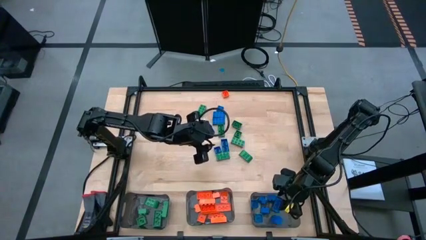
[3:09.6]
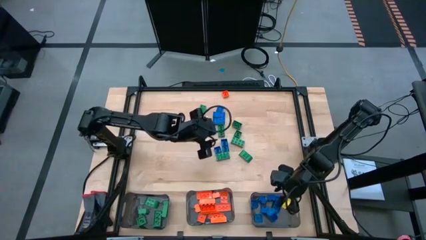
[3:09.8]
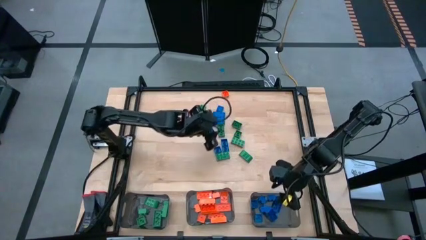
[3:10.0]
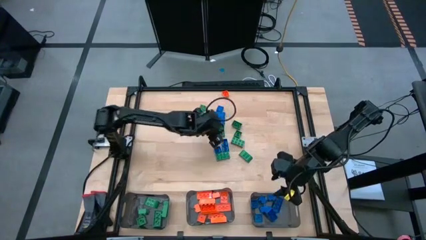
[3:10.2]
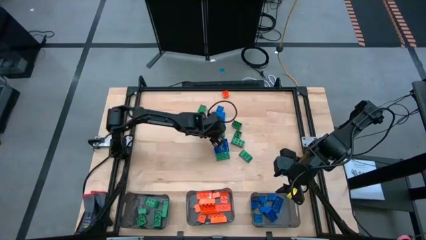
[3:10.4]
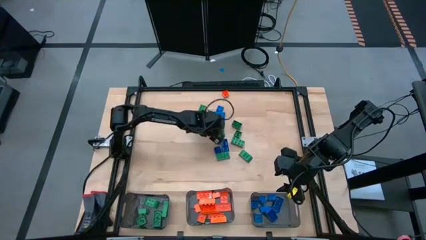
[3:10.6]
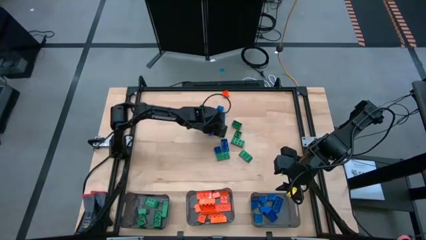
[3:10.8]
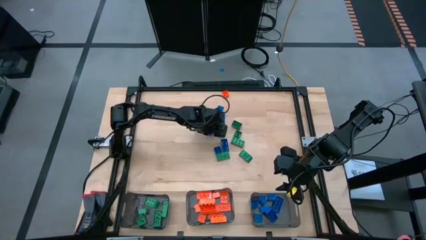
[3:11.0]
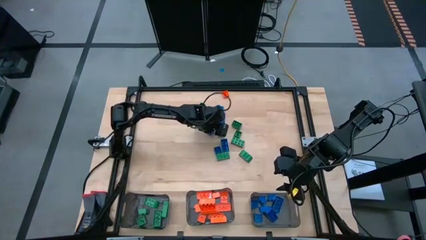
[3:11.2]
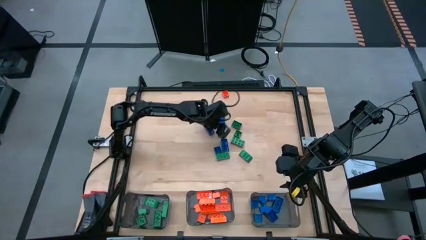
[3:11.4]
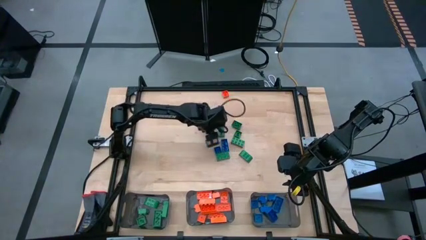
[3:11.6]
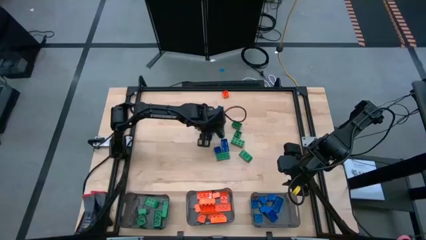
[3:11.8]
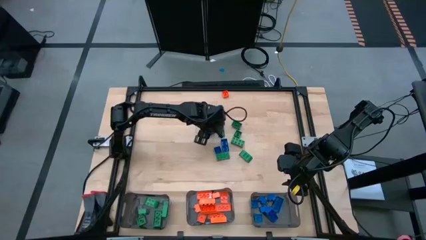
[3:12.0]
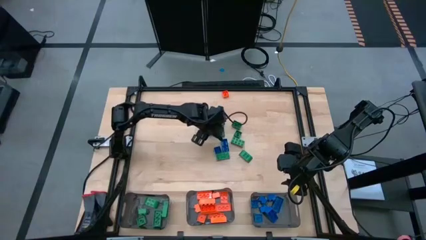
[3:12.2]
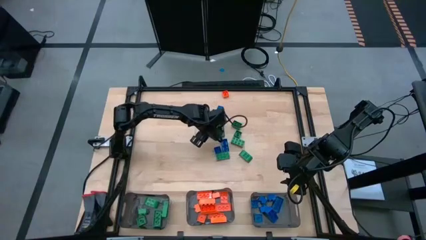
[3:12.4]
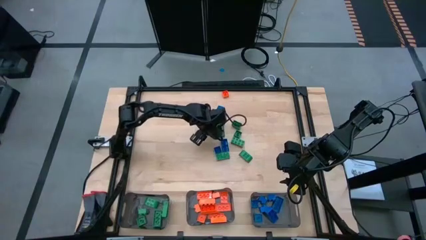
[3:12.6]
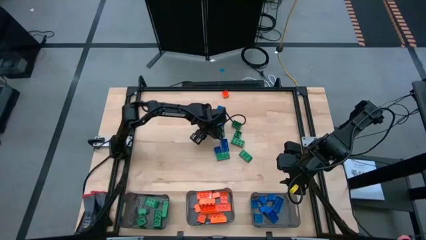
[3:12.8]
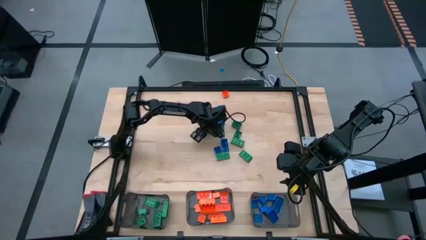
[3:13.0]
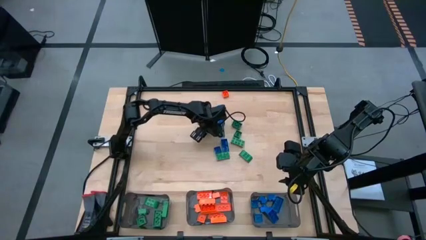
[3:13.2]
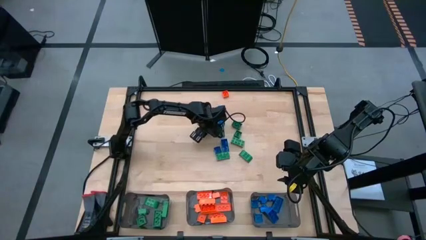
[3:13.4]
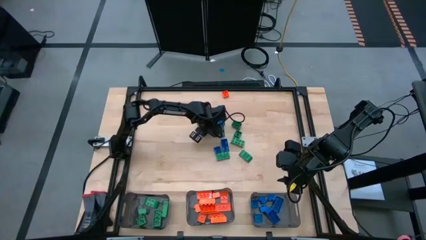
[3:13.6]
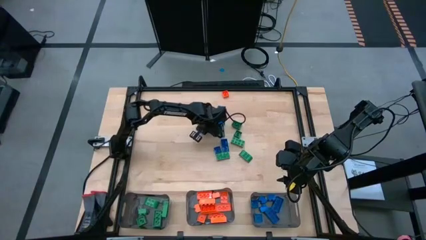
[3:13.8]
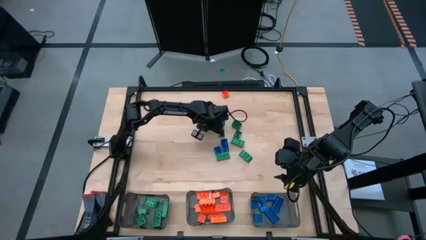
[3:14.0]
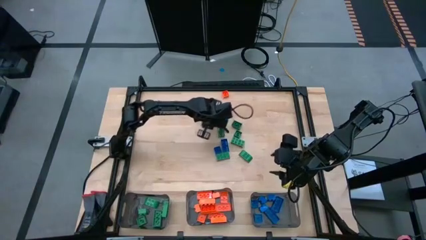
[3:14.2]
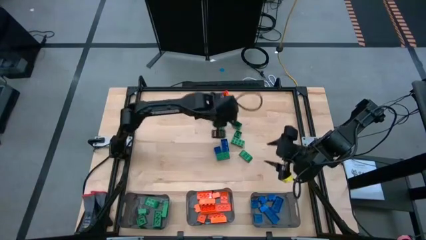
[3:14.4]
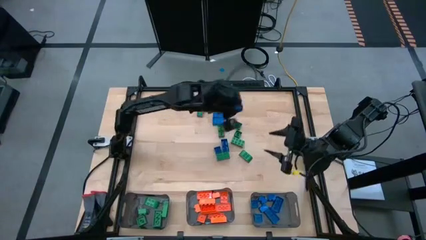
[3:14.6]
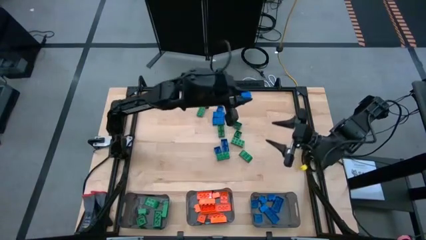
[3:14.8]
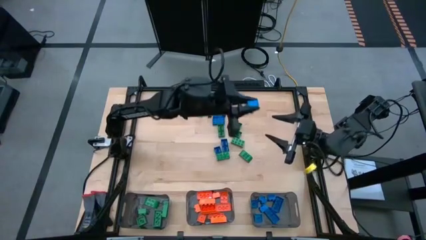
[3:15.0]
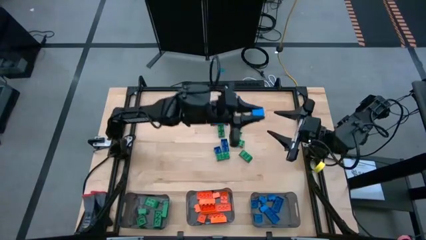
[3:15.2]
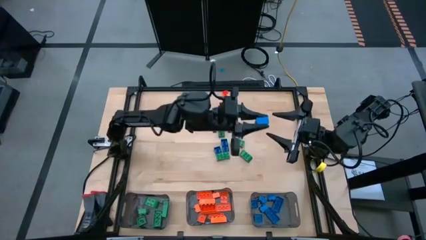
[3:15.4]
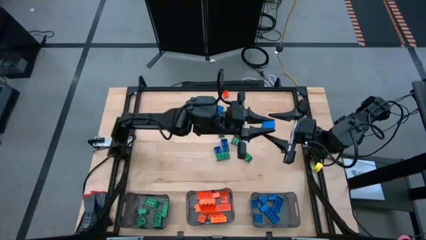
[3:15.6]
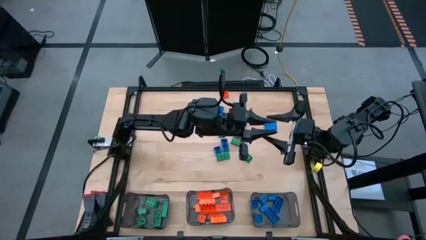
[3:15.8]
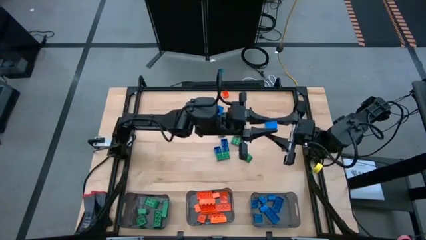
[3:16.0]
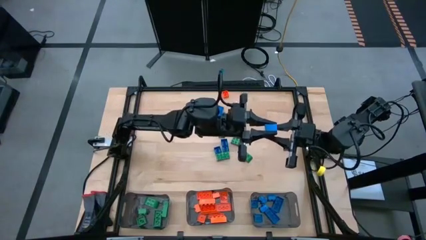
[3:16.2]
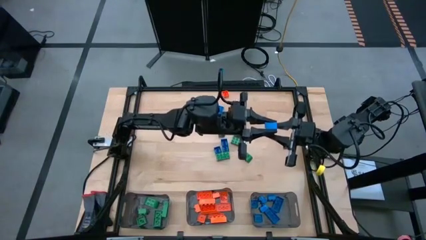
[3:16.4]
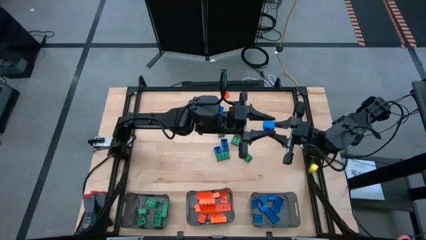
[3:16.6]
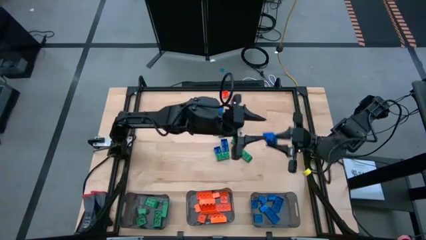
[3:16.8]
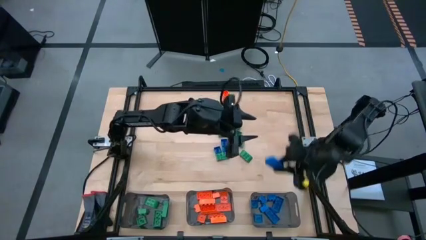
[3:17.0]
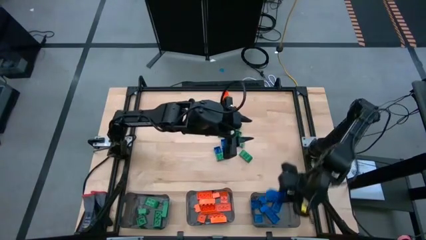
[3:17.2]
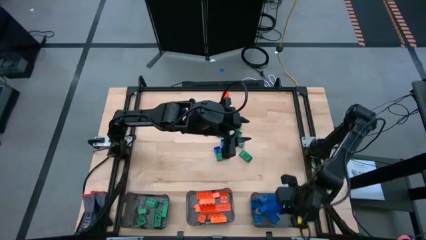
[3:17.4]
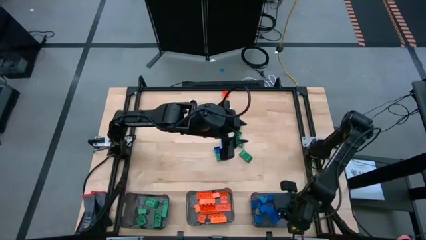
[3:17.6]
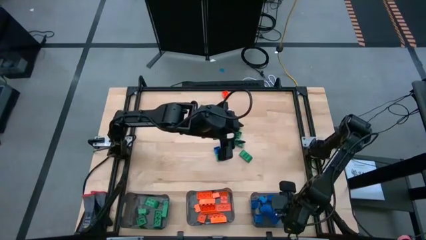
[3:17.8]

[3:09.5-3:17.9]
Task: Sort blocks
Put the blue game piece into the right black bin

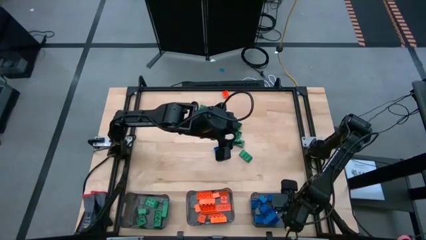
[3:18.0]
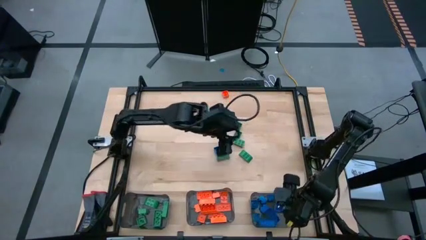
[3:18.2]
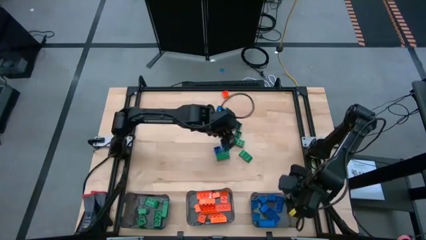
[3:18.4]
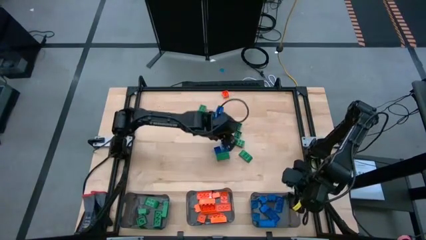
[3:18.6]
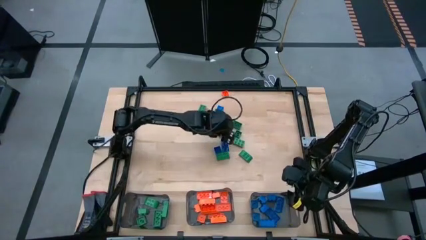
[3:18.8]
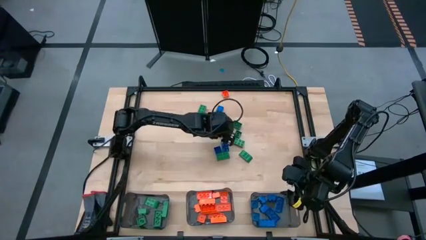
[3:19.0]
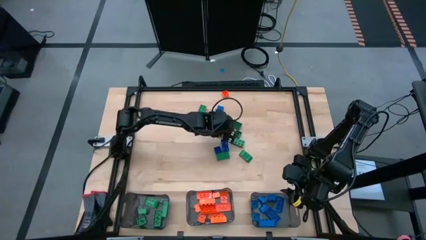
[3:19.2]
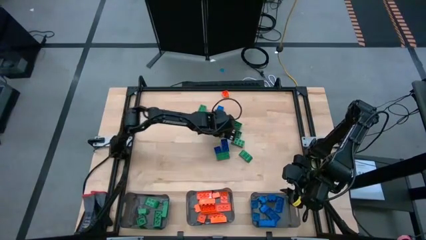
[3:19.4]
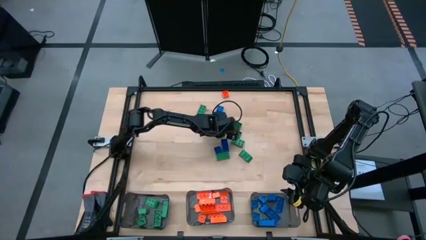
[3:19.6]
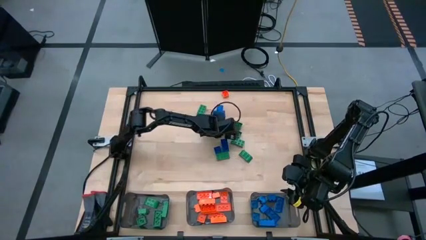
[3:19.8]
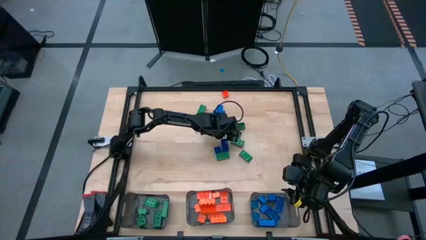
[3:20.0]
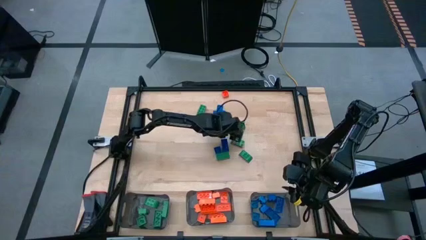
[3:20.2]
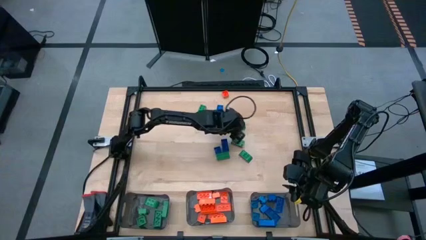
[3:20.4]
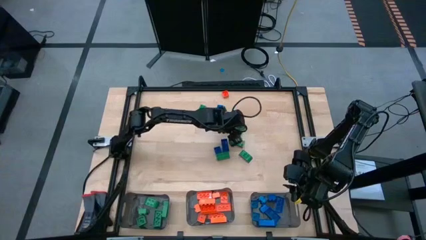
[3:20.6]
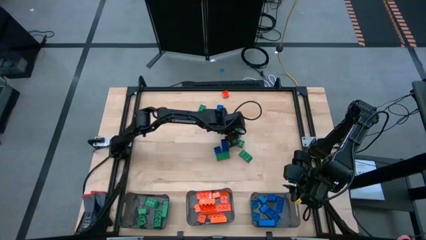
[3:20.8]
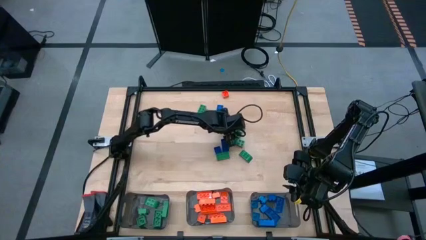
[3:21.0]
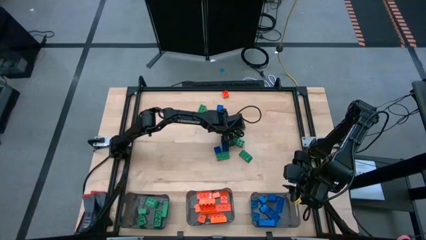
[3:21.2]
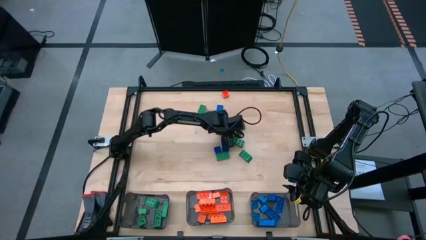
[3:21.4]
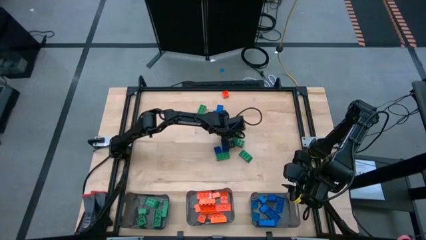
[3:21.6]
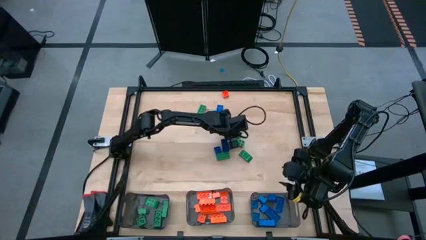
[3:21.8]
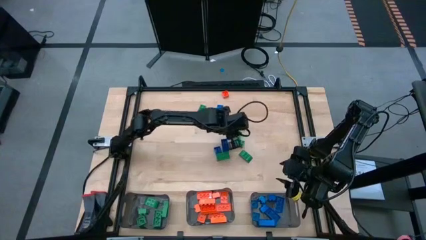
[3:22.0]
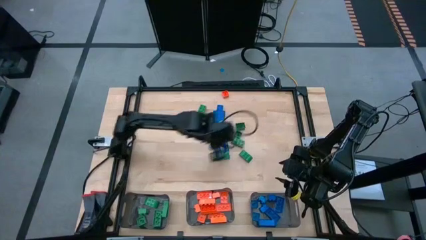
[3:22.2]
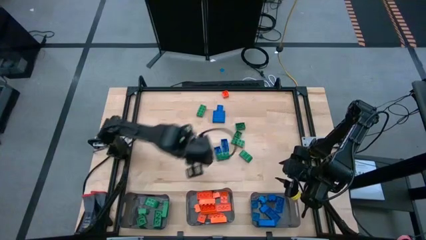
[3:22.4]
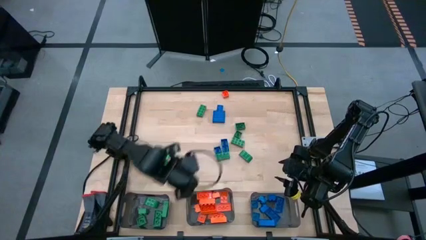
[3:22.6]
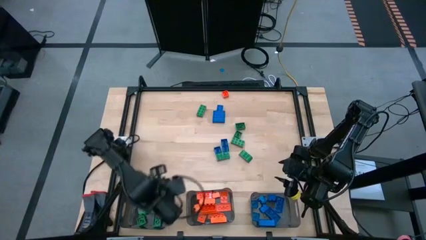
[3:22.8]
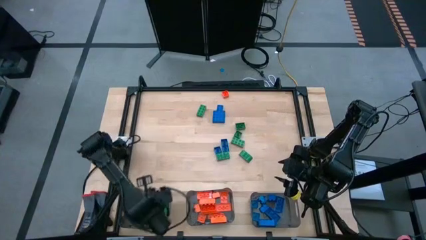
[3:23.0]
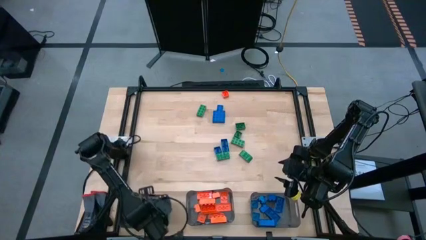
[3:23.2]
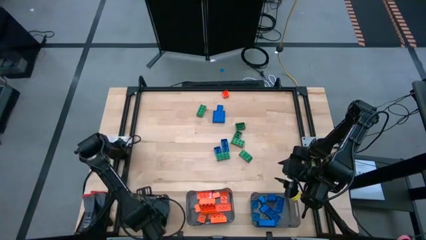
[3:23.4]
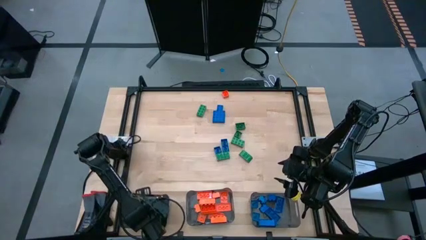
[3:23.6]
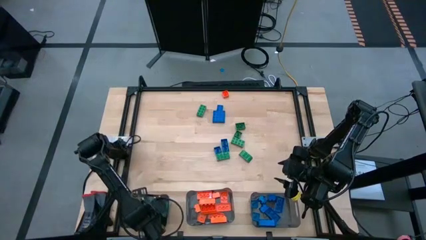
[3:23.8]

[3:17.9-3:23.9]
Put the green game piece into the left black bin

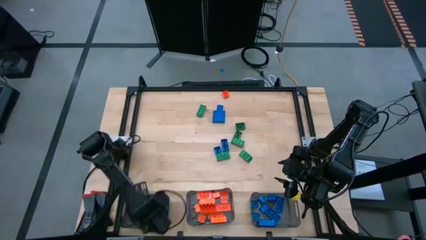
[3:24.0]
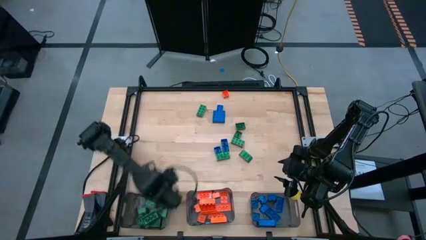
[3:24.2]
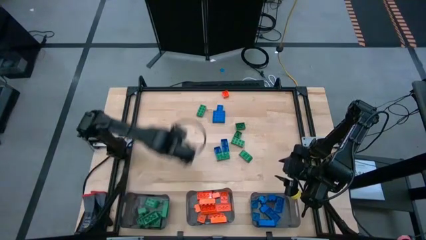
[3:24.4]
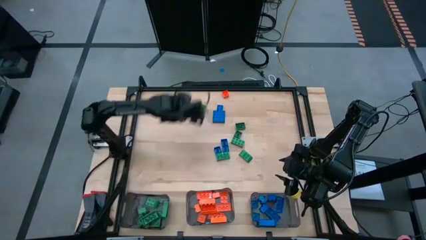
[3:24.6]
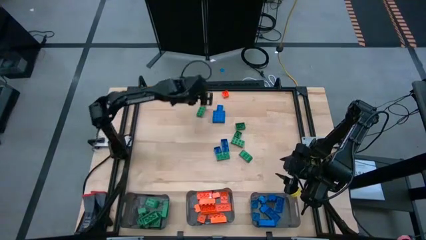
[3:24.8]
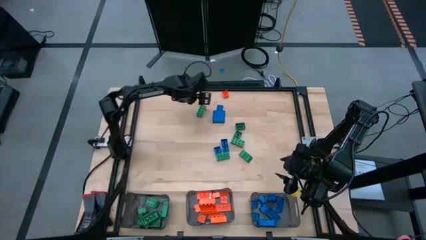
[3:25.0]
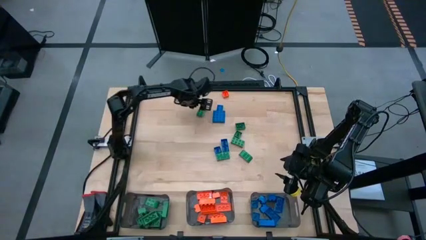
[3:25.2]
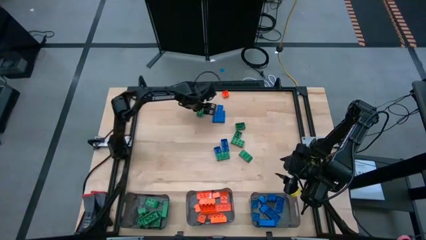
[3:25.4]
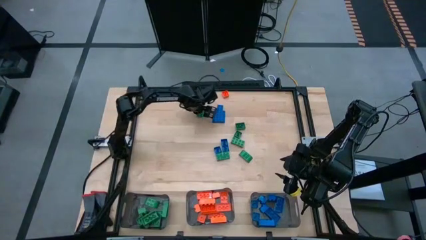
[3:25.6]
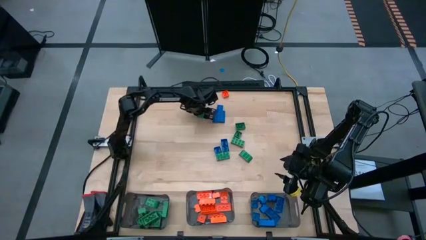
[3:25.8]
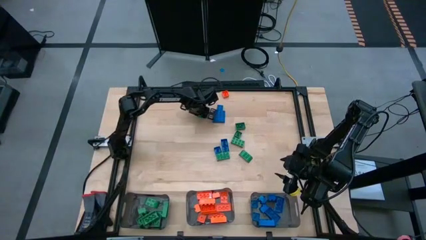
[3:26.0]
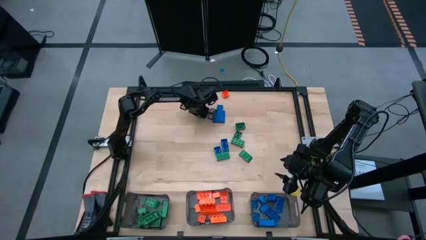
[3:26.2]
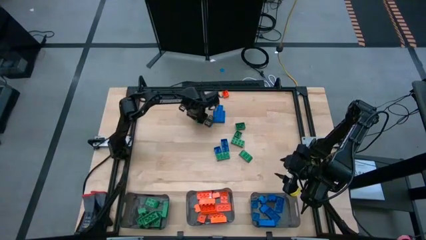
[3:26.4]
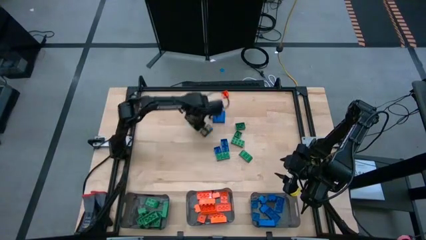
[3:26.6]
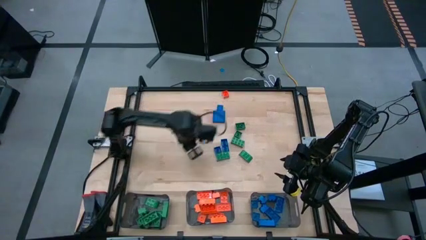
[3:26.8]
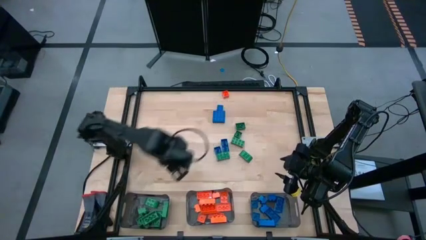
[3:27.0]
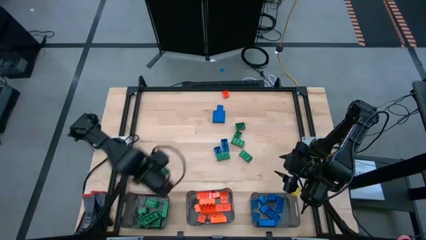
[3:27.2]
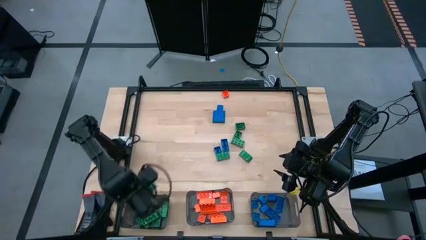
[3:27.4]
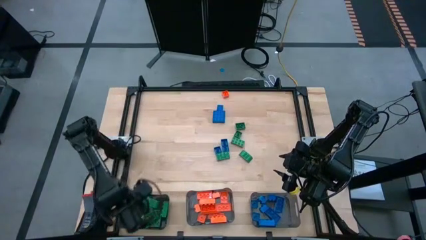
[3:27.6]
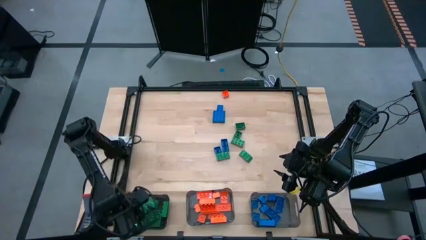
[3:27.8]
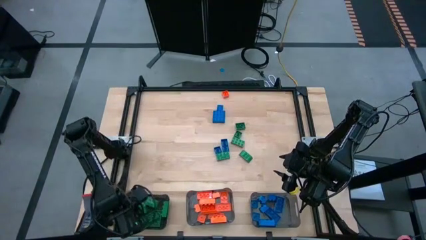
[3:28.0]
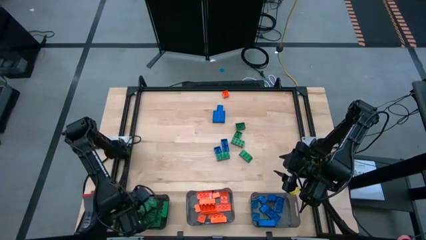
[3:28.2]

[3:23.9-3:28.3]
Put the green game piece into the left black bin
